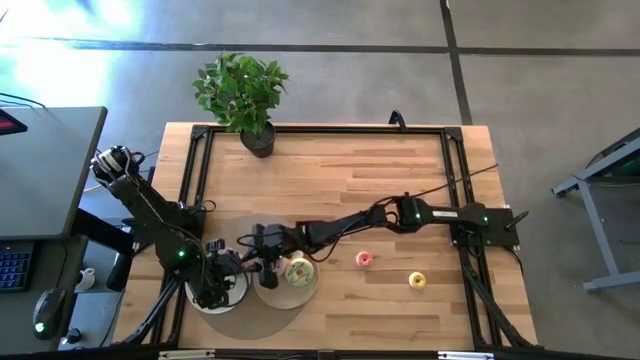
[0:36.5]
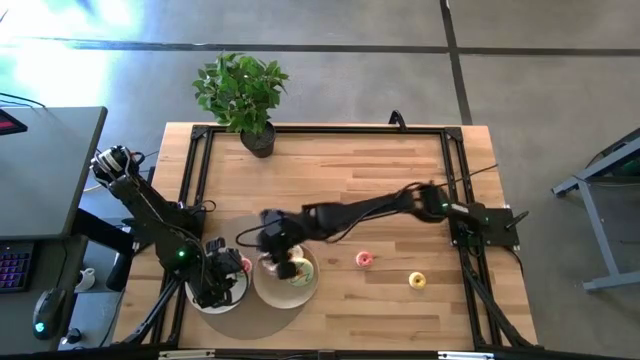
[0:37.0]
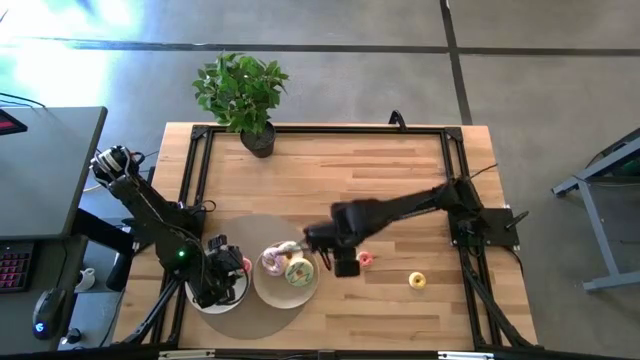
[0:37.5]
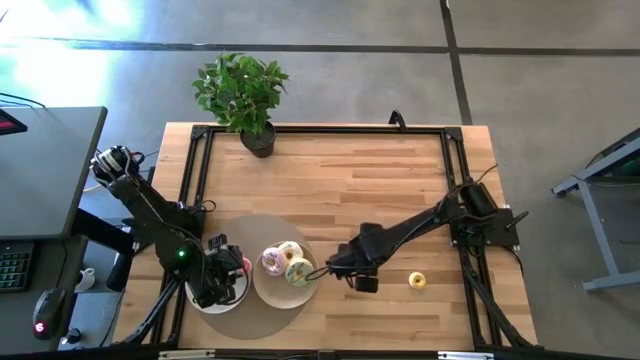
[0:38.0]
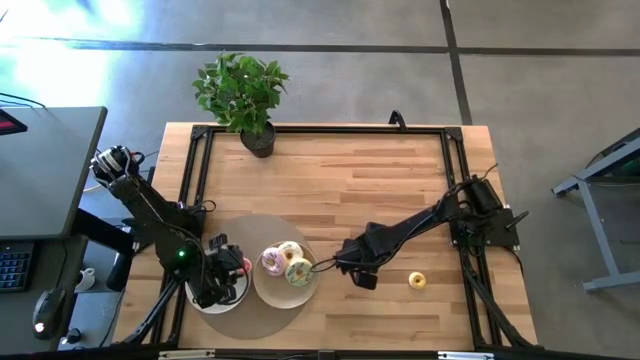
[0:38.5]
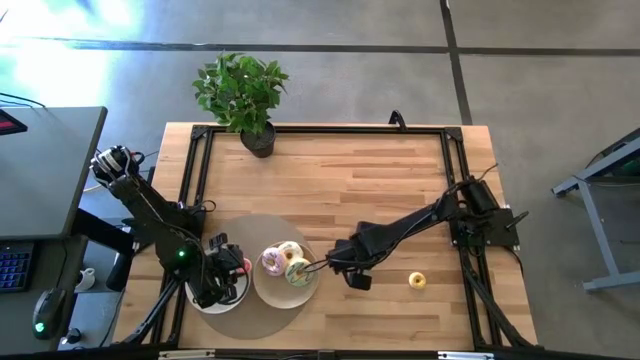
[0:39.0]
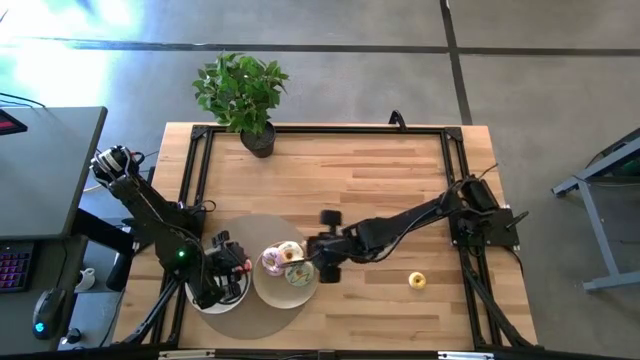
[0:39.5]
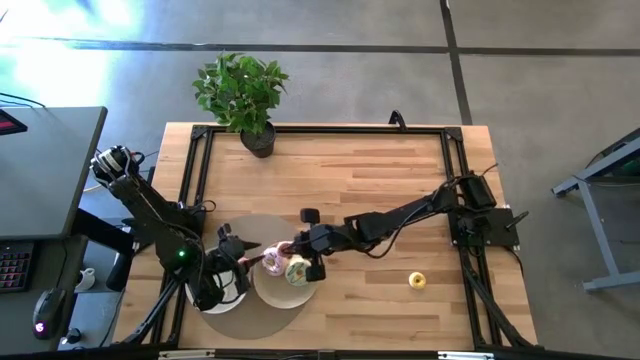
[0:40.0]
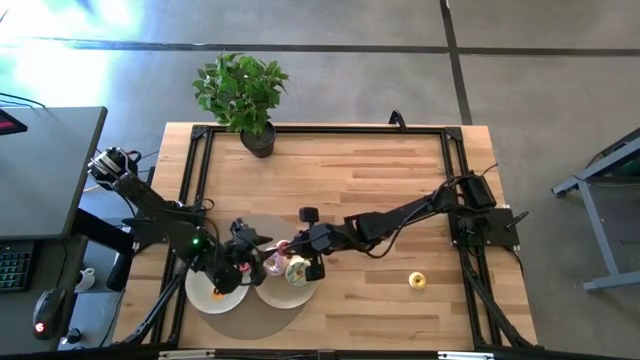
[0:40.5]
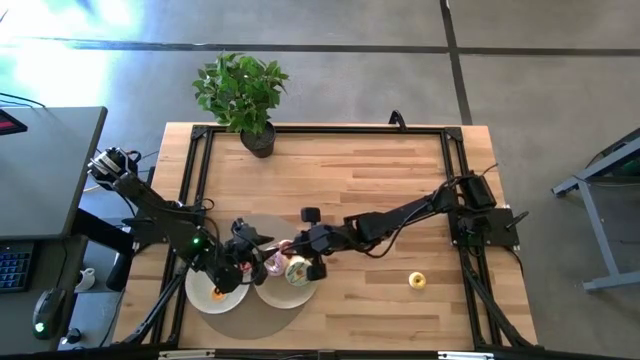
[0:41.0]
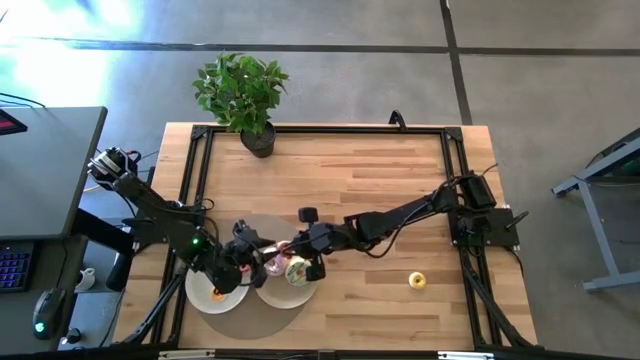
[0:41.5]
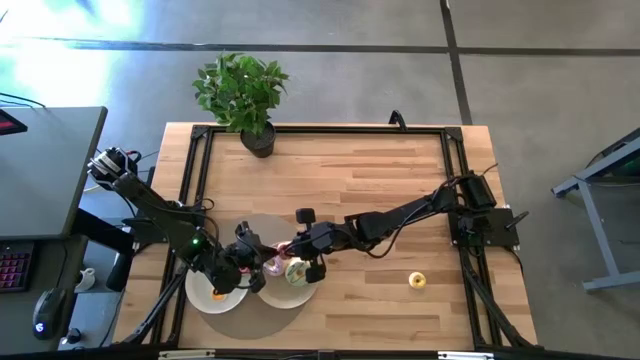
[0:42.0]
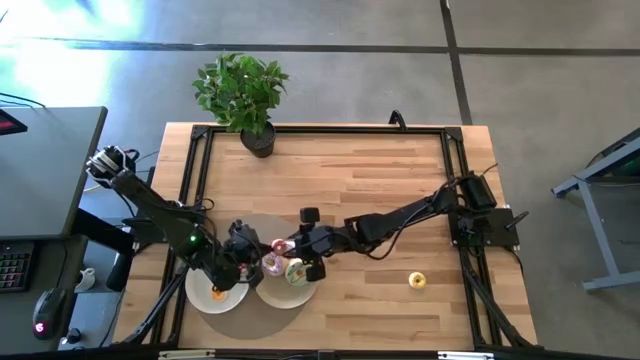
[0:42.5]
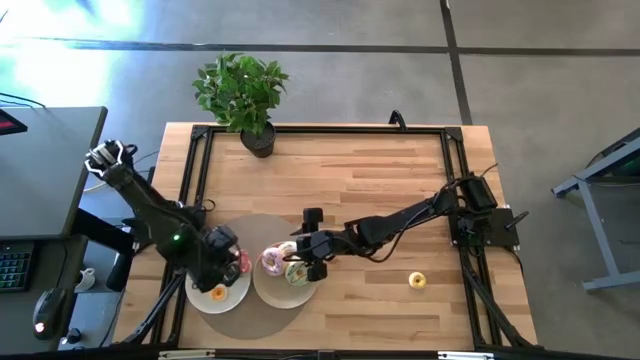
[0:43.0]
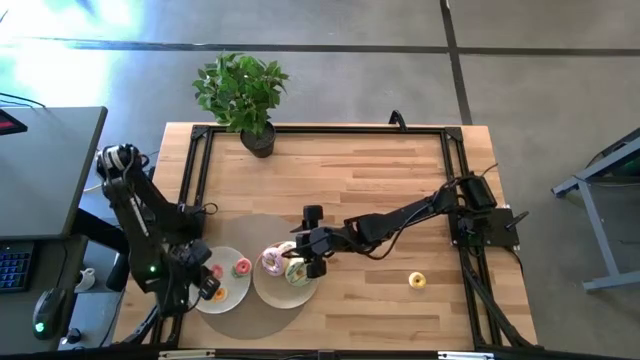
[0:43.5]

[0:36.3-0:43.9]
Task: Pick & Place donuts
Put the small pink donut on the white plate

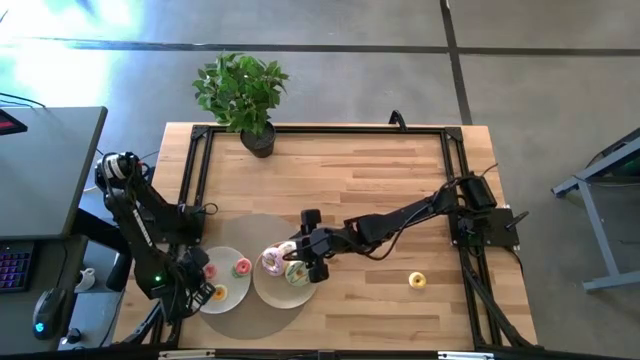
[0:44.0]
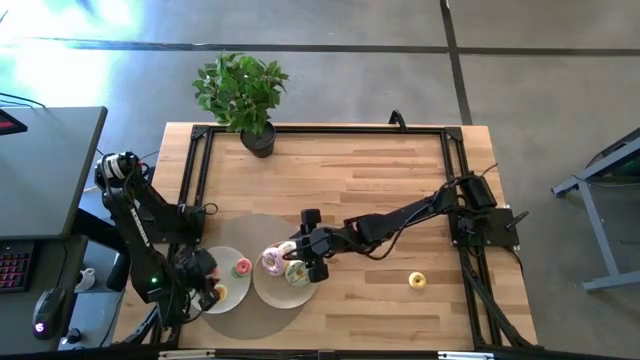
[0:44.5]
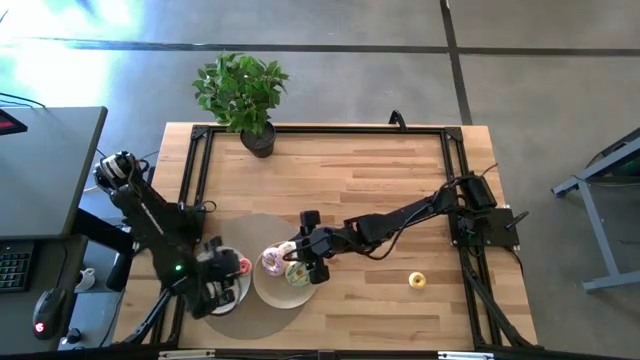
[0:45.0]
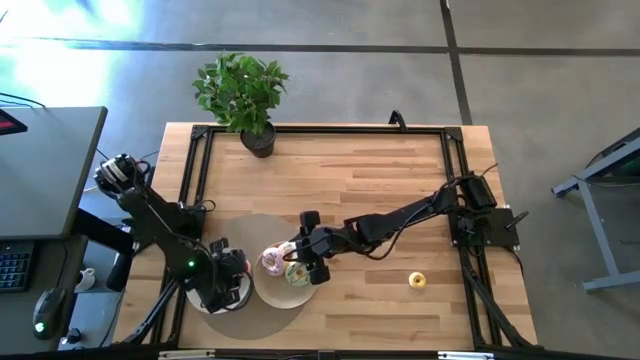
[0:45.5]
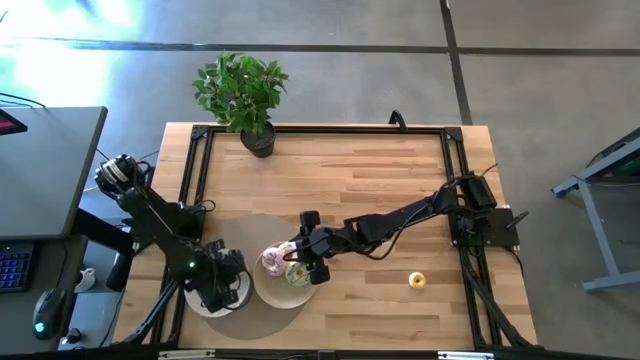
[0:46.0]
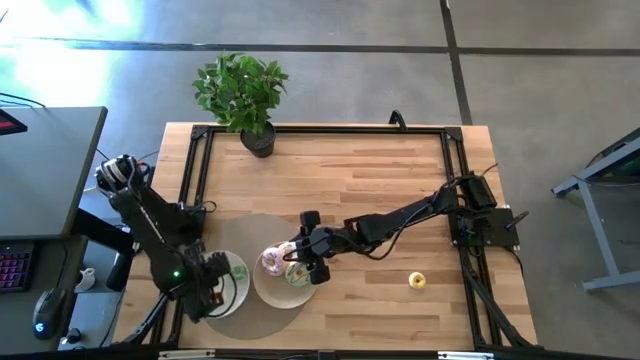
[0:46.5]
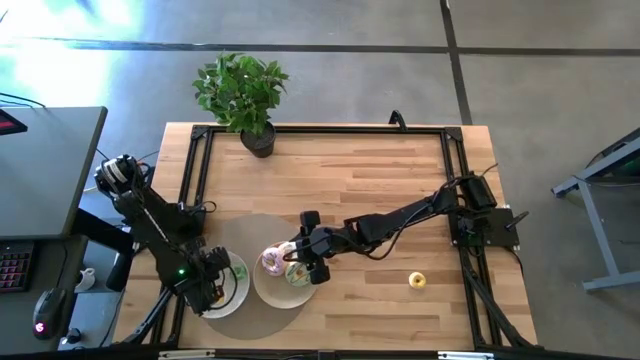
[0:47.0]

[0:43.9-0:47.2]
Adjust the right pink donut on the white plate

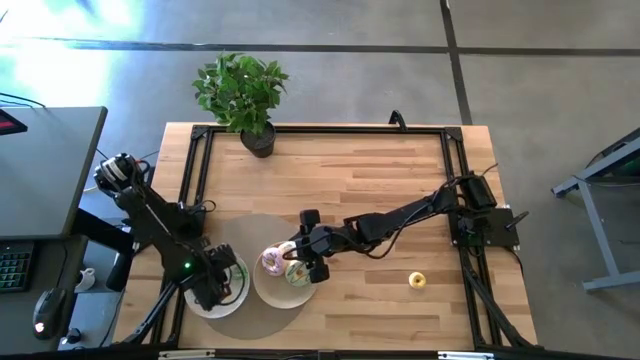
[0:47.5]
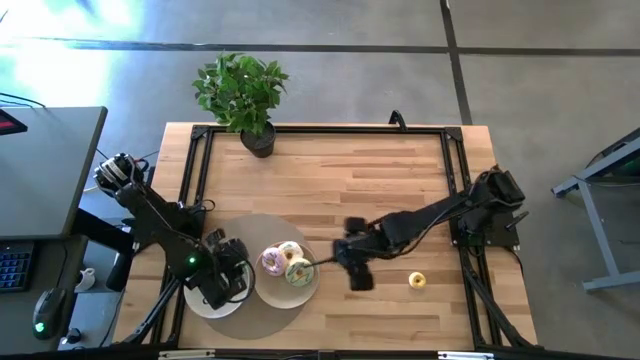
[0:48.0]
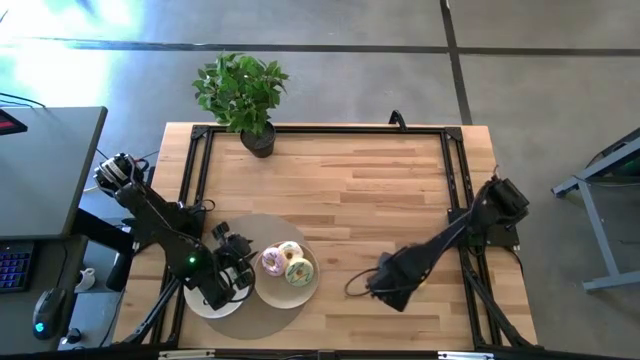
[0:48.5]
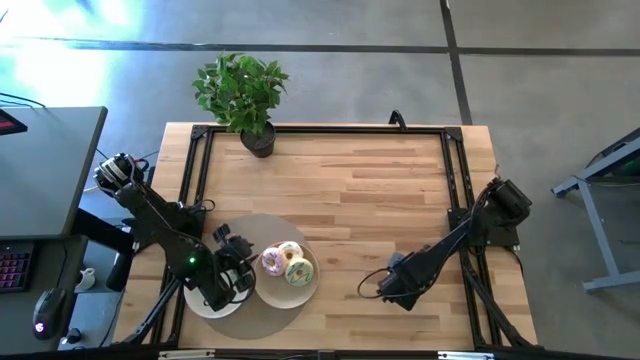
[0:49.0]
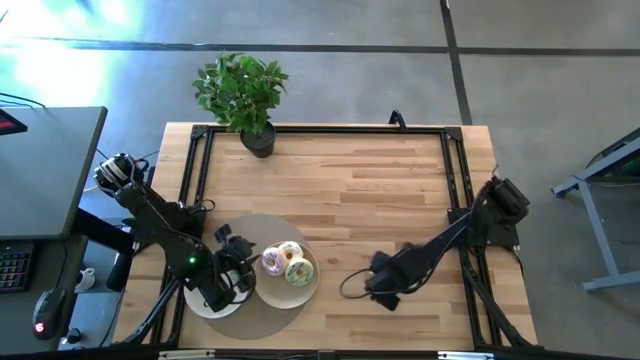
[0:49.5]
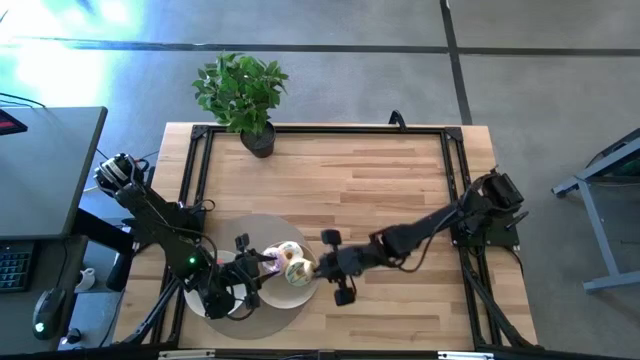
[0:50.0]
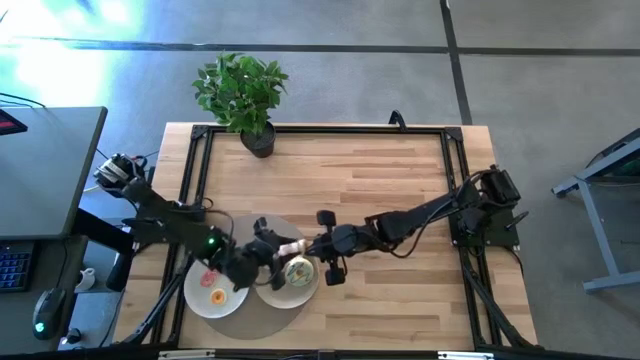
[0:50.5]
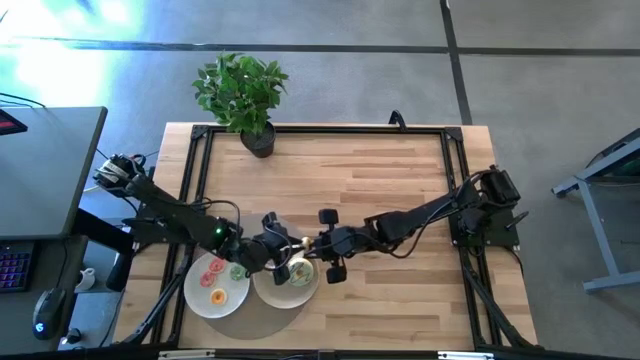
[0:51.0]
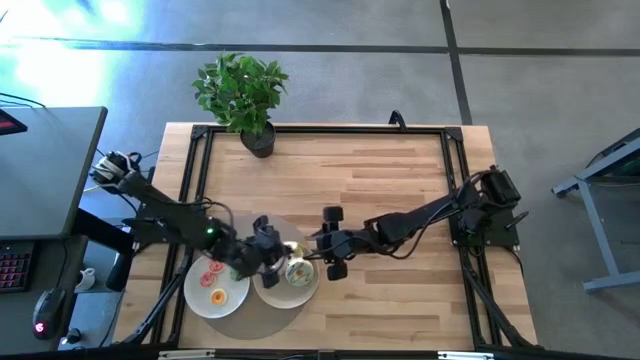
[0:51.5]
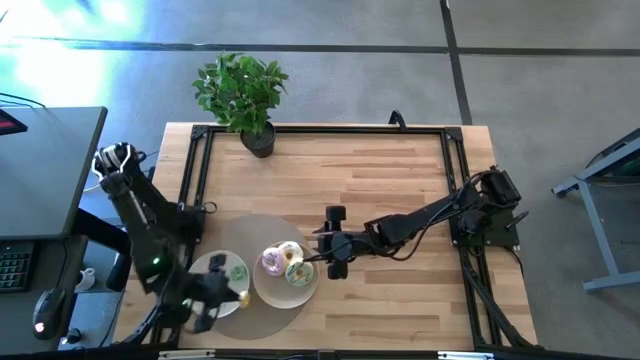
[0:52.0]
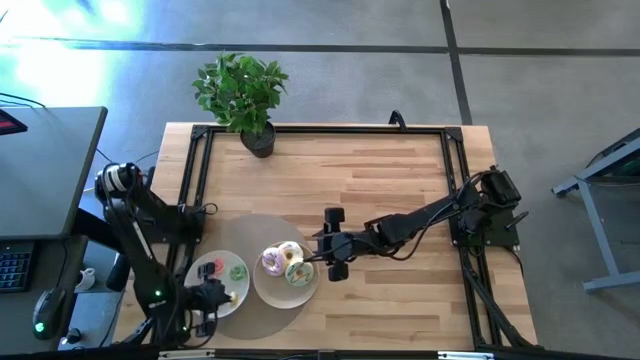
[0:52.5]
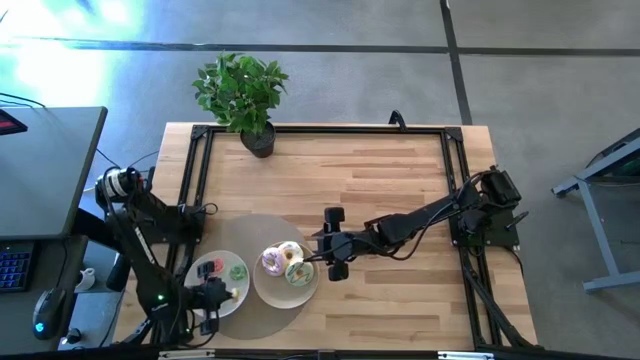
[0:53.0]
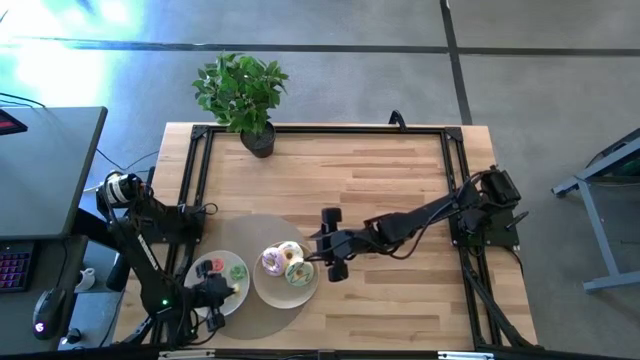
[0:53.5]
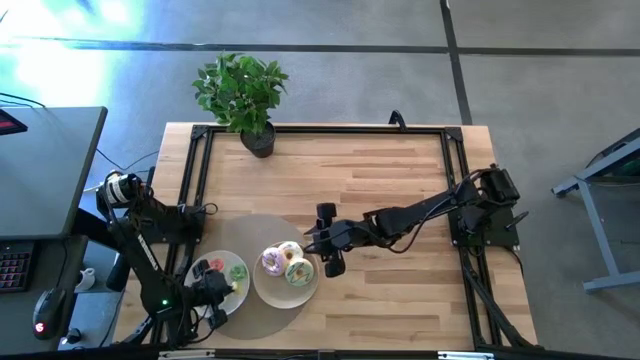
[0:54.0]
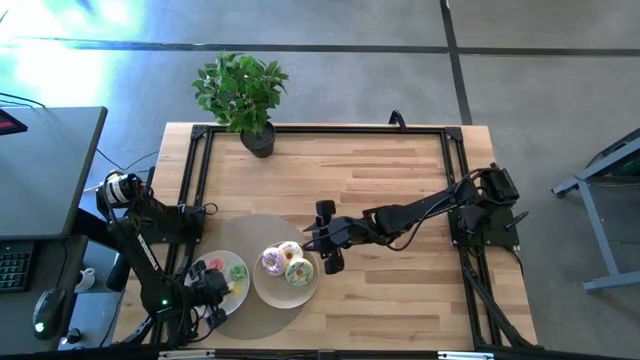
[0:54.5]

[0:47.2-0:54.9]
Put the small yellow donut on the white plate

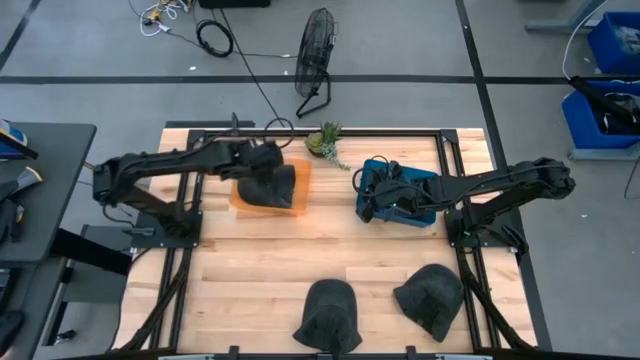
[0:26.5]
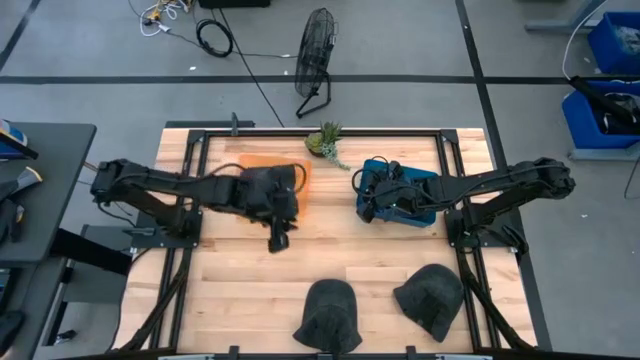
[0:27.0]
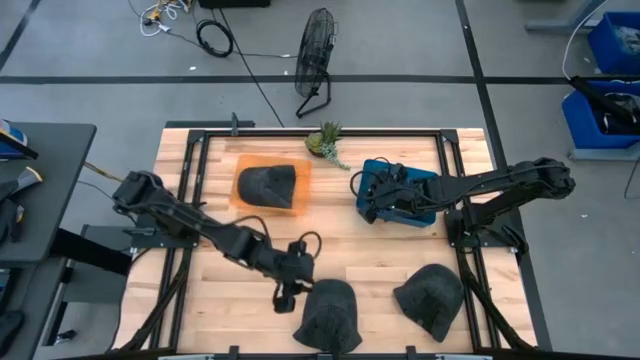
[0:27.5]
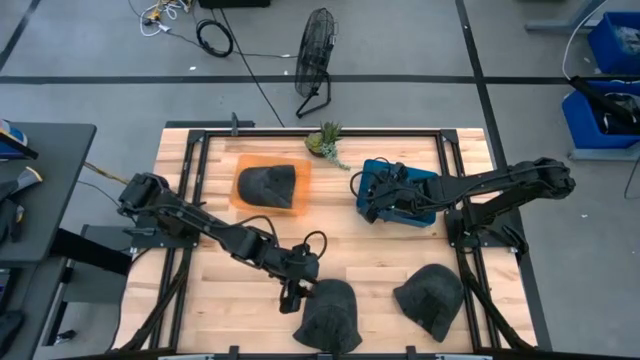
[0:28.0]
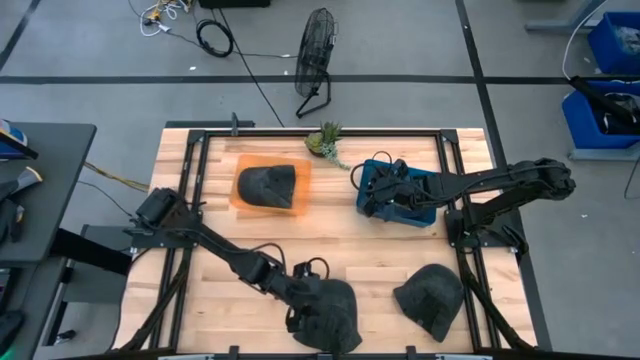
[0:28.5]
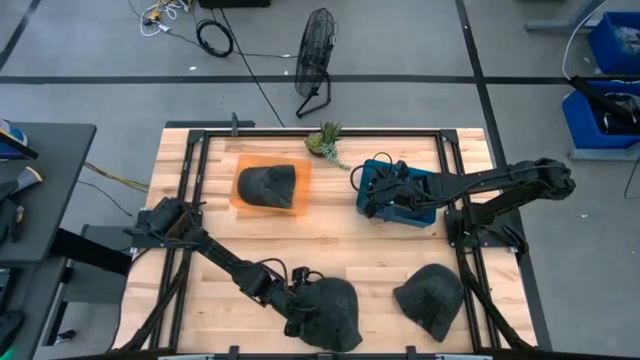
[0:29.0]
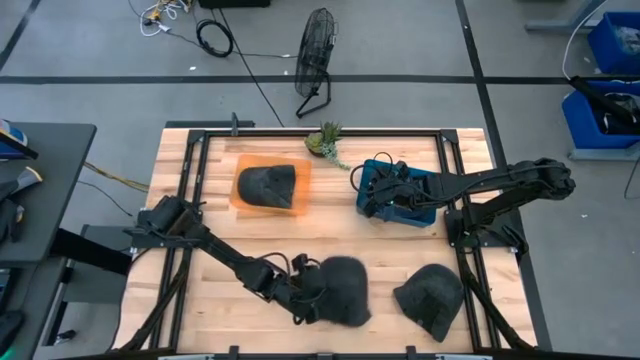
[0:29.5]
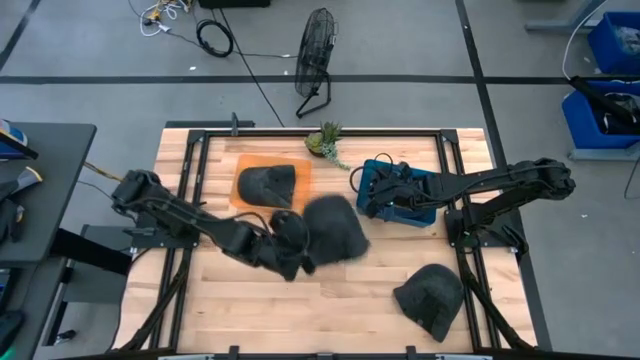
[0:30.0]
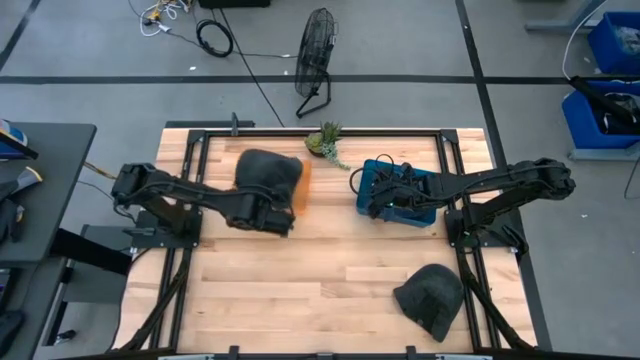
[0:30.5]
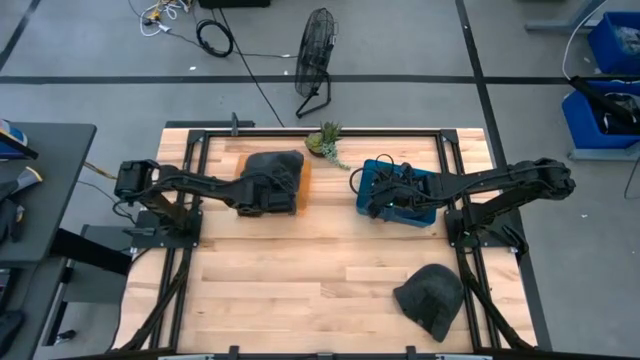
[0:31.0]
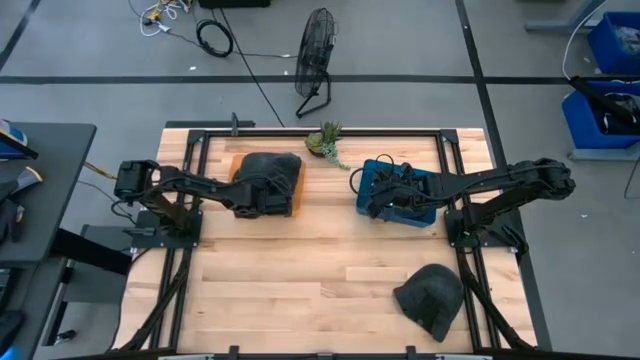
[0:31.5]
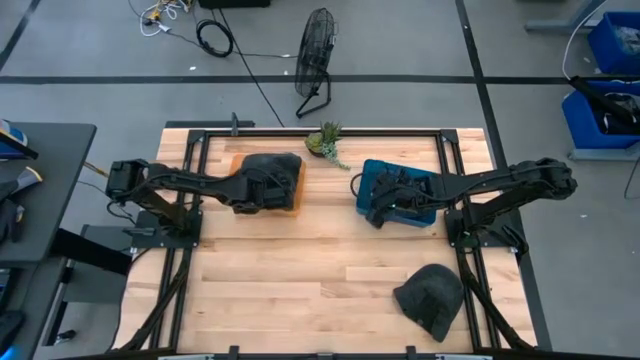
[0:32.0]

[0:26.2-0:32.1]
Task: Pick & Place hat
Put the left black cap into the orange bin
